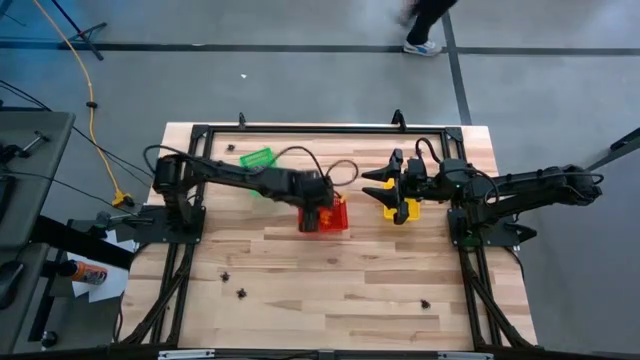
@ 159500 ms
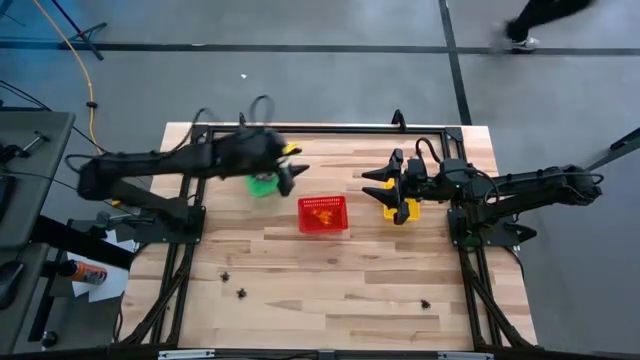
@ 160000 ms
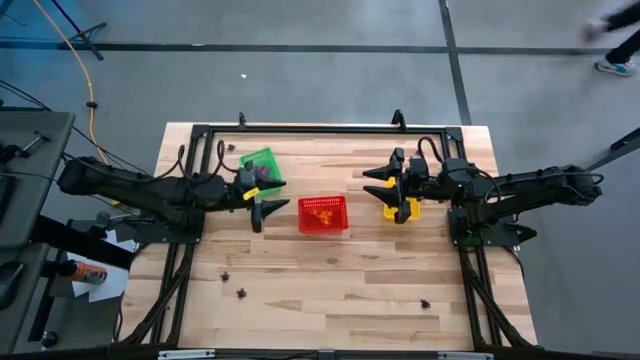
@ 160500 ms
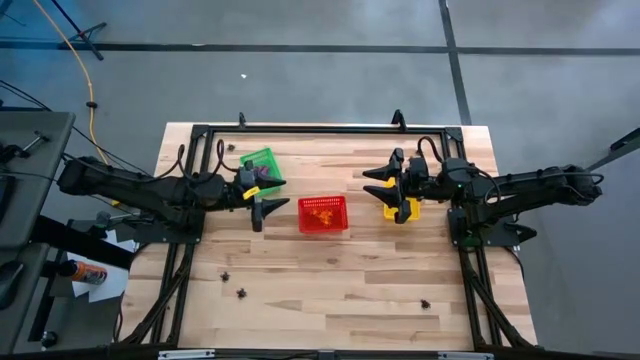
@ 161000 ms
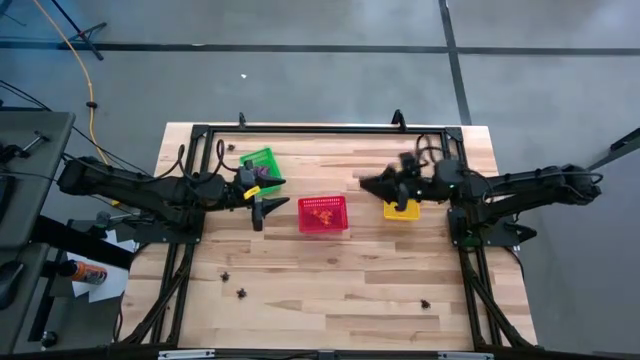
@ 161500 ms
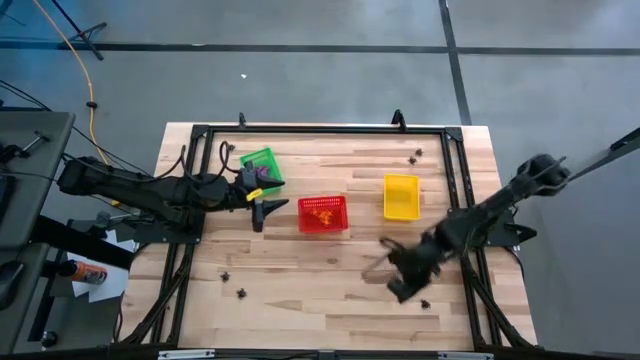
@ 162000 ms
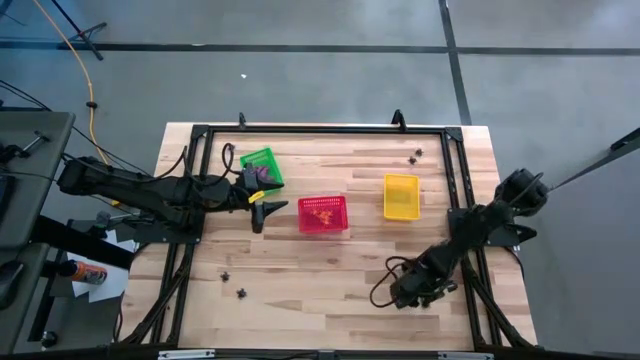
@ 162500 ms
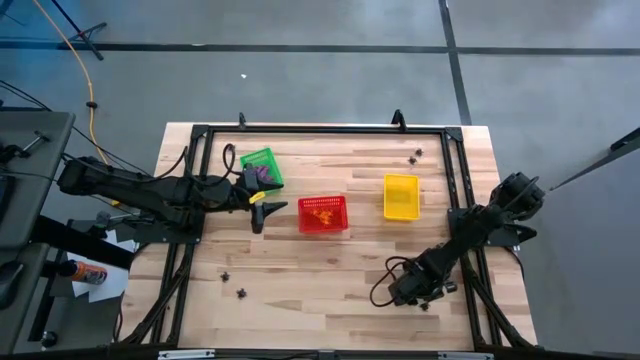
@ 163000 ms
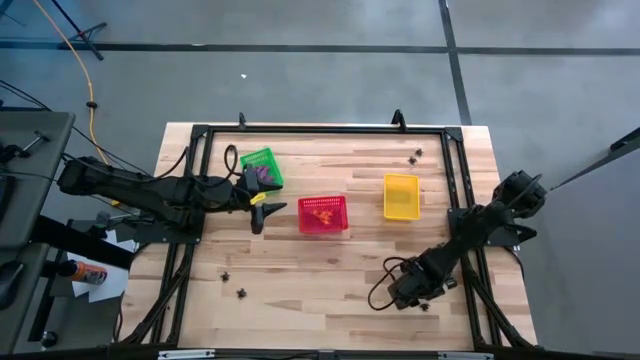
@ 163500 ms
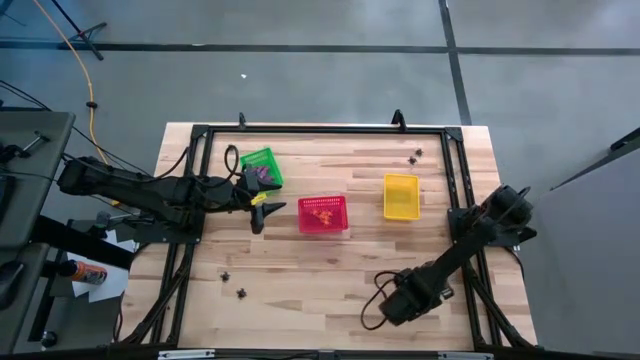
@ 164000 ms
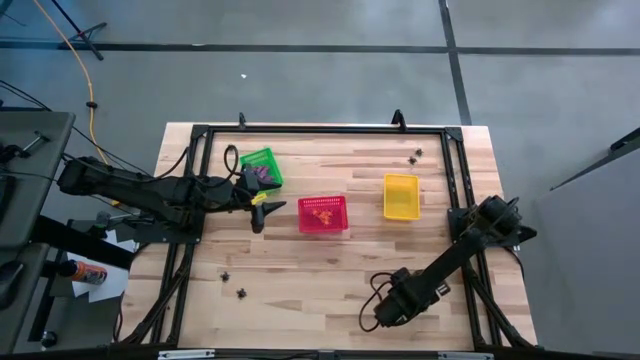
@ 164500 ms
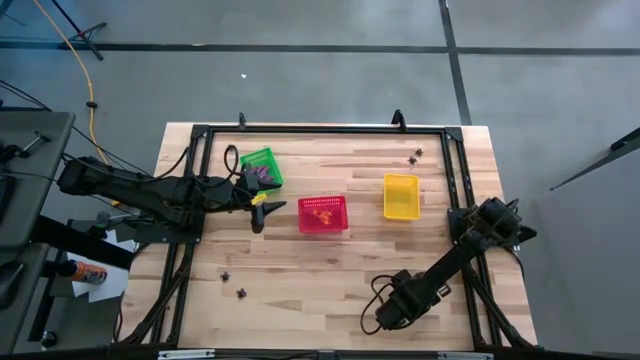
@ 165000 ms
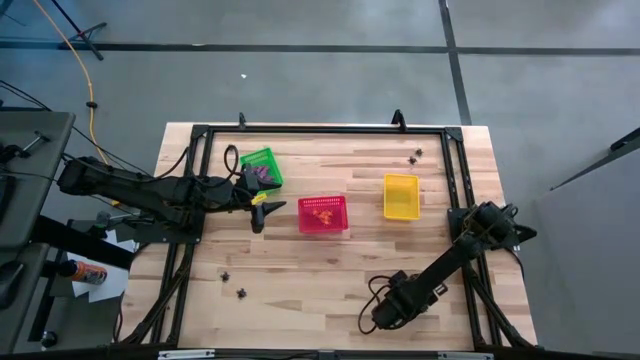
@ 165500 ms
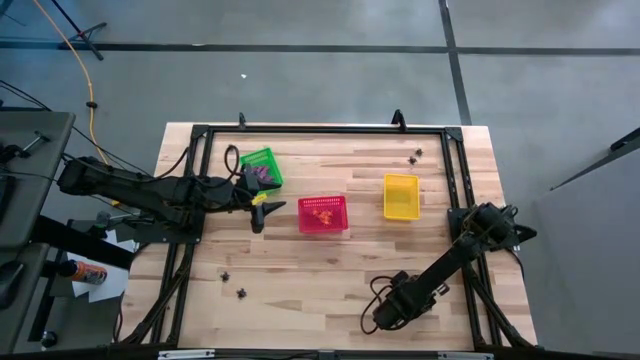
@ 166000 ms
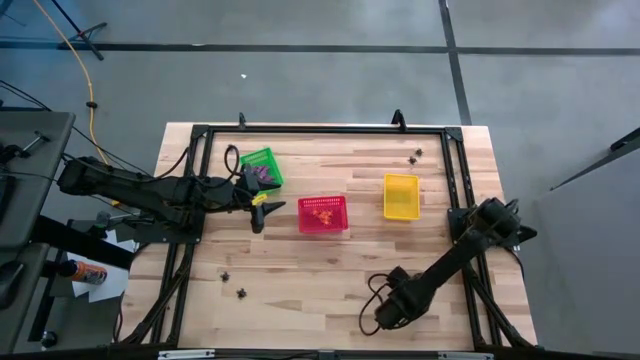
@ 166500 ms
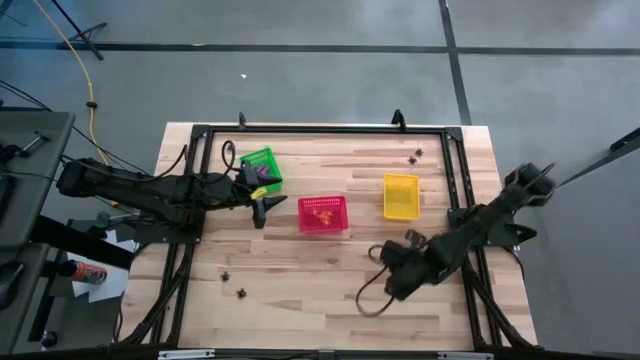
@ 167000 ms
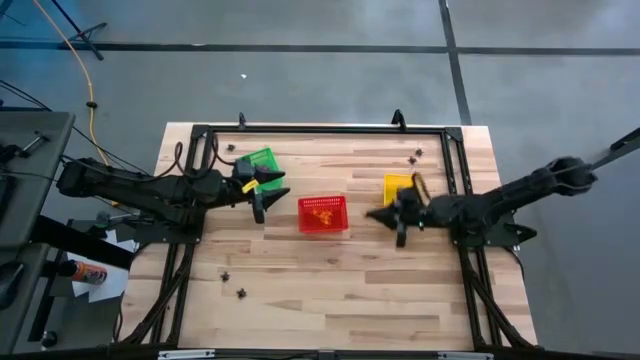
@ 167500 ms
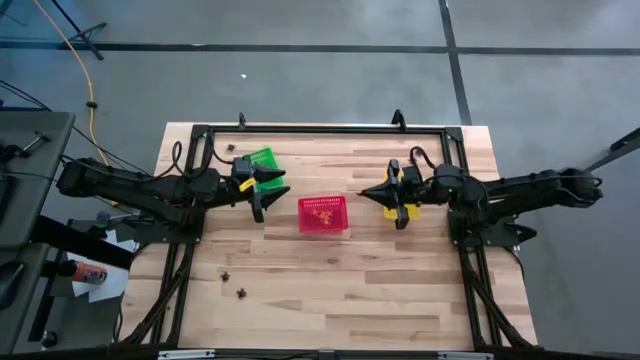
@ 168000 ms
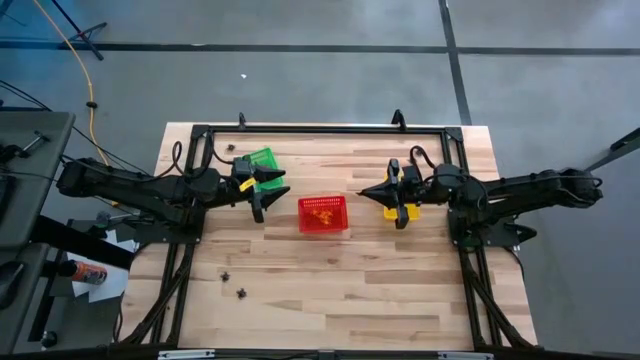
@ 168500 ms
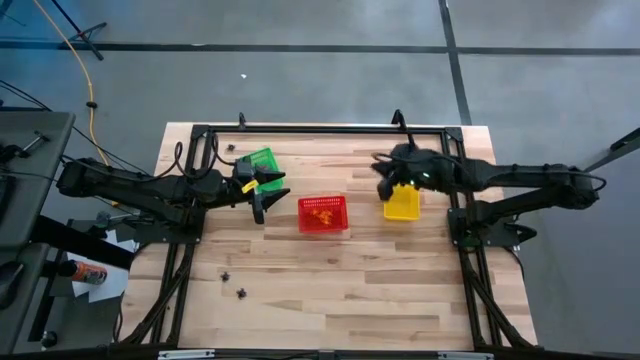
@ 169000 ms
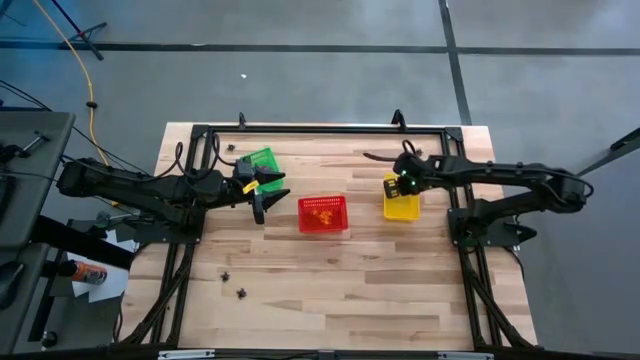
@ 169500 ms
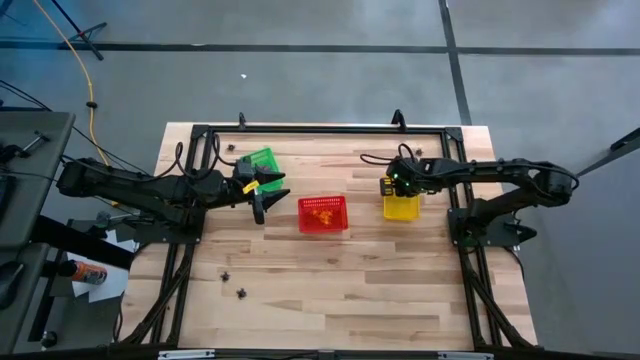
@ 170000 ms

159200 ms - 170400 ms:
Task: Sort Halloween decoration
Put the black spider toy into the yellow bin

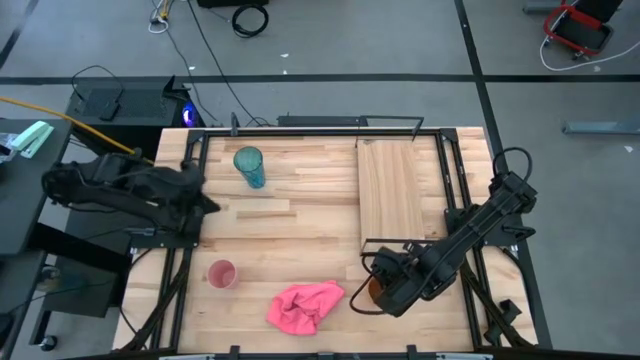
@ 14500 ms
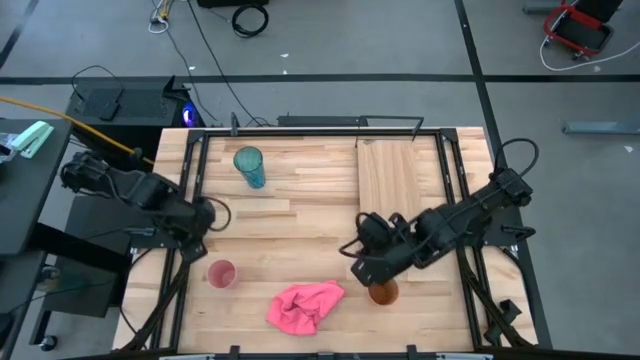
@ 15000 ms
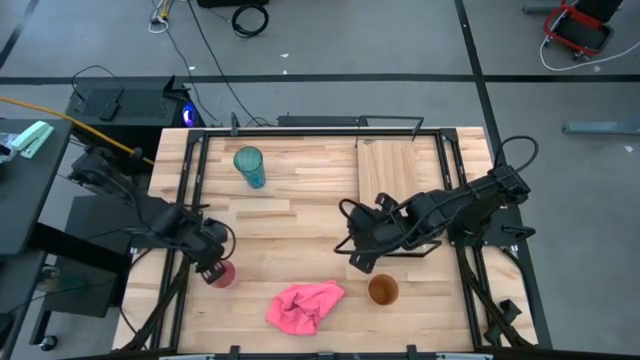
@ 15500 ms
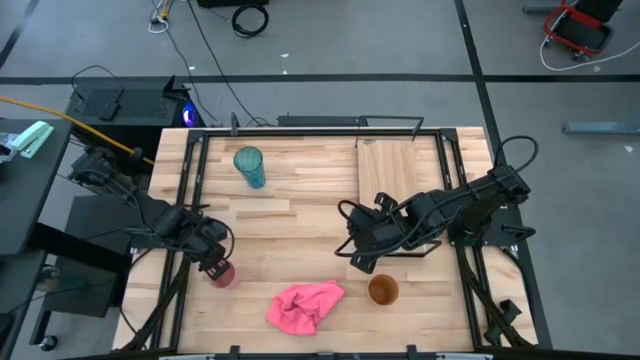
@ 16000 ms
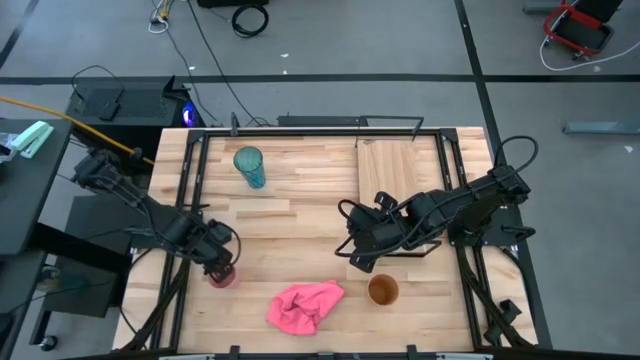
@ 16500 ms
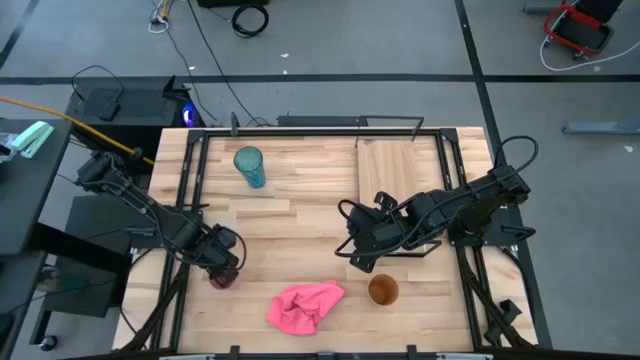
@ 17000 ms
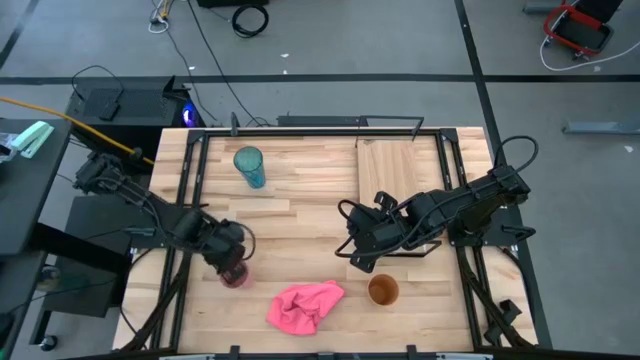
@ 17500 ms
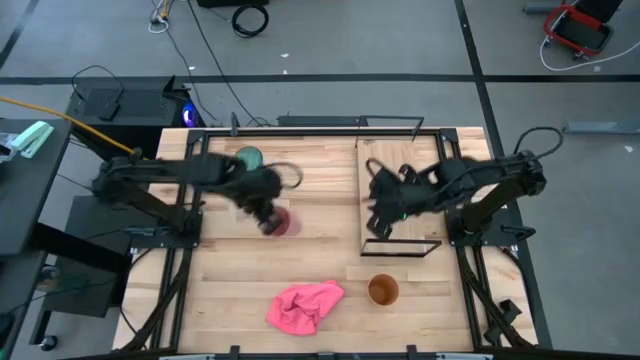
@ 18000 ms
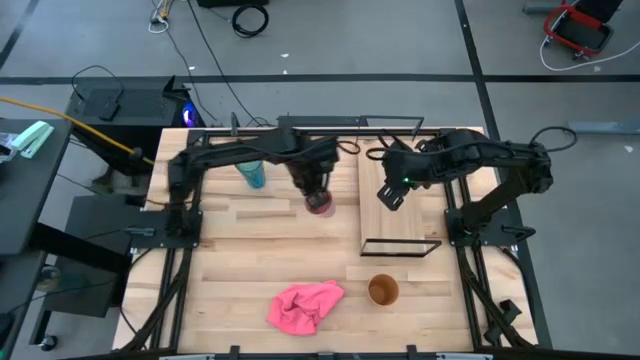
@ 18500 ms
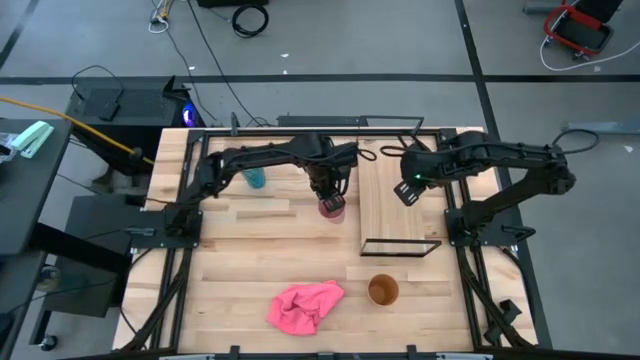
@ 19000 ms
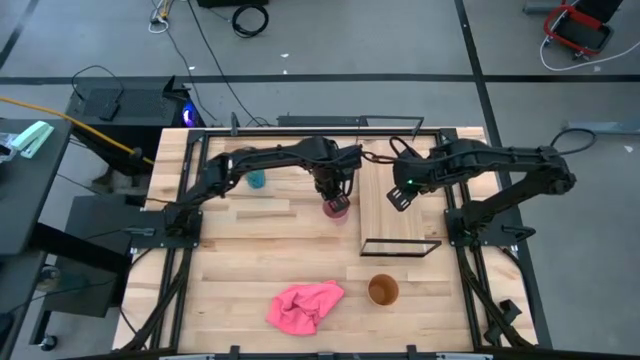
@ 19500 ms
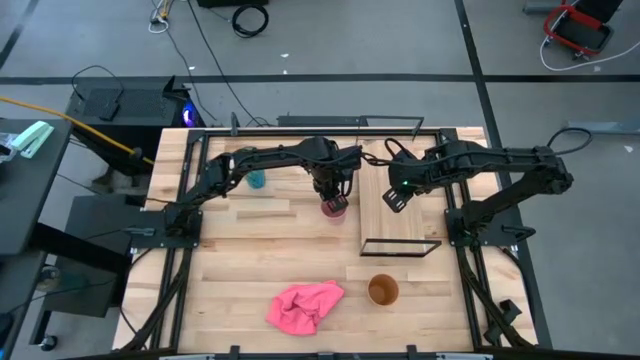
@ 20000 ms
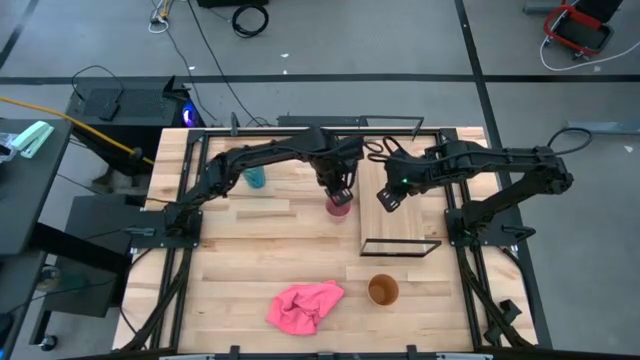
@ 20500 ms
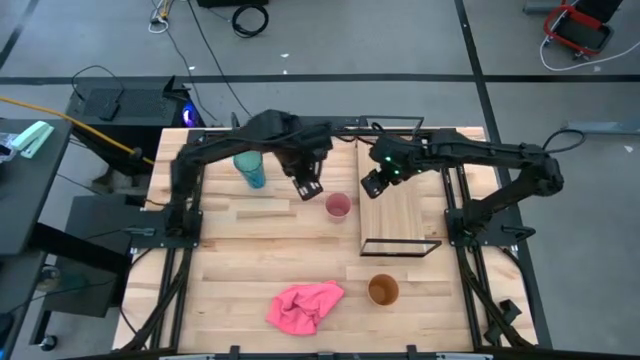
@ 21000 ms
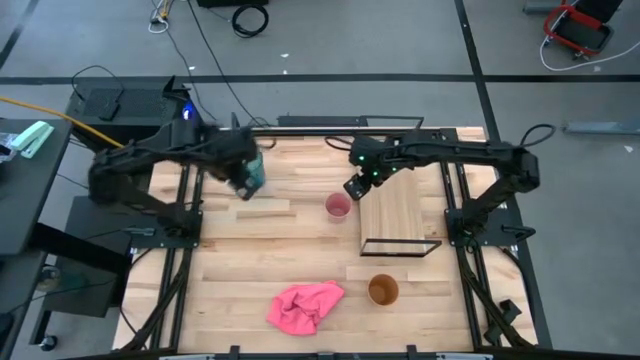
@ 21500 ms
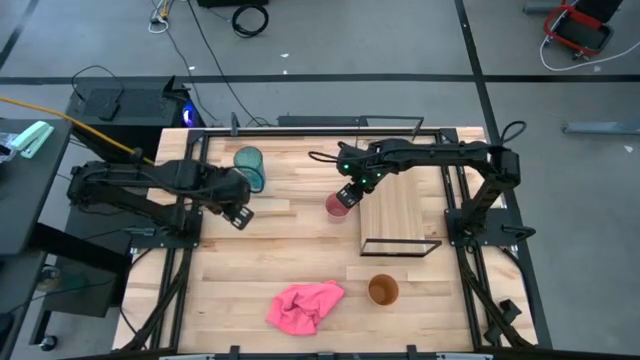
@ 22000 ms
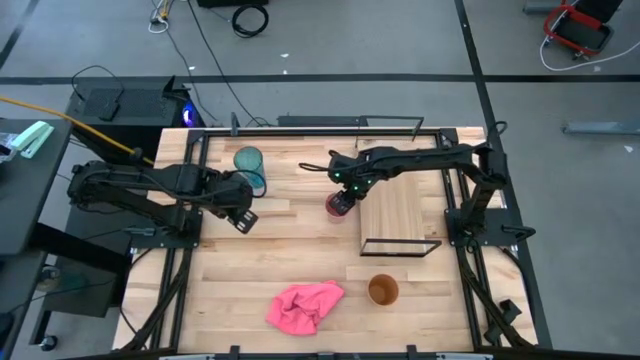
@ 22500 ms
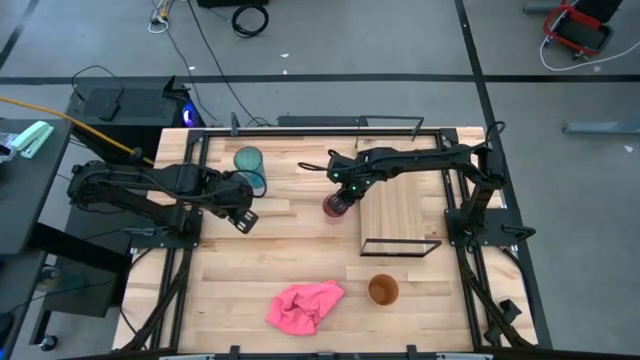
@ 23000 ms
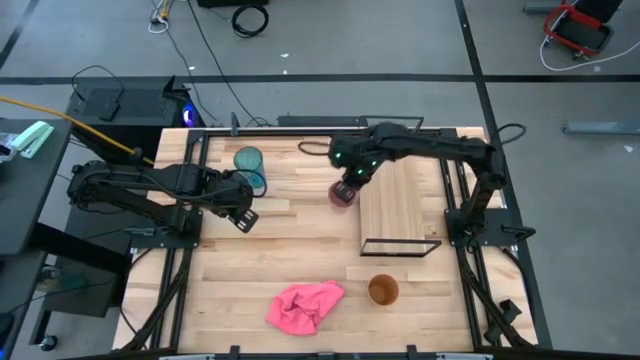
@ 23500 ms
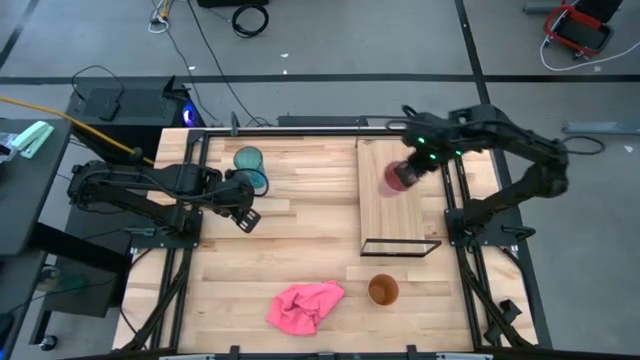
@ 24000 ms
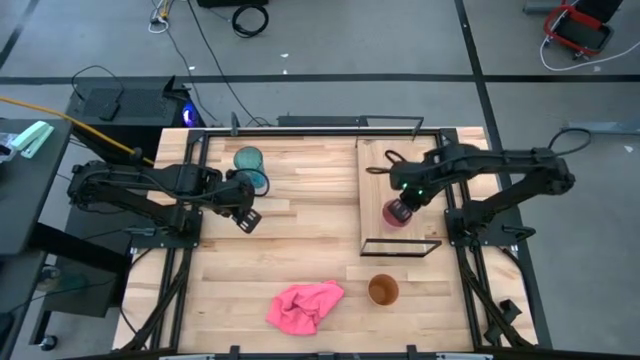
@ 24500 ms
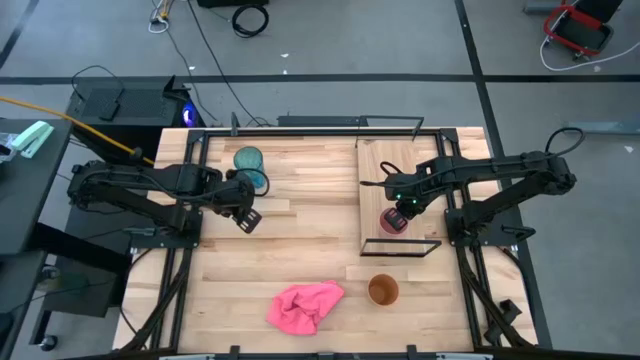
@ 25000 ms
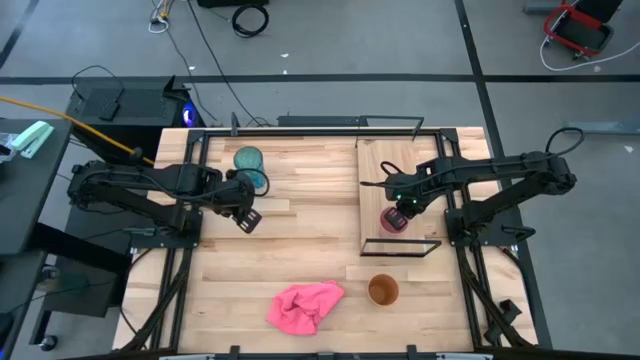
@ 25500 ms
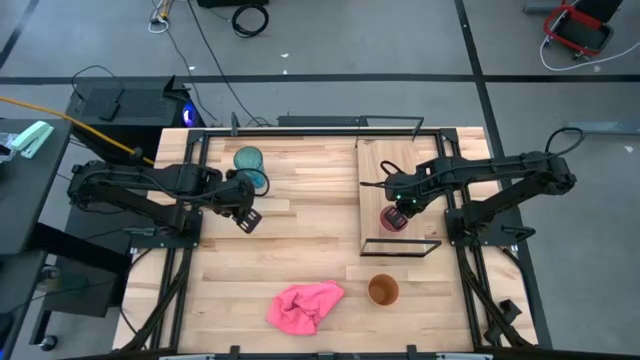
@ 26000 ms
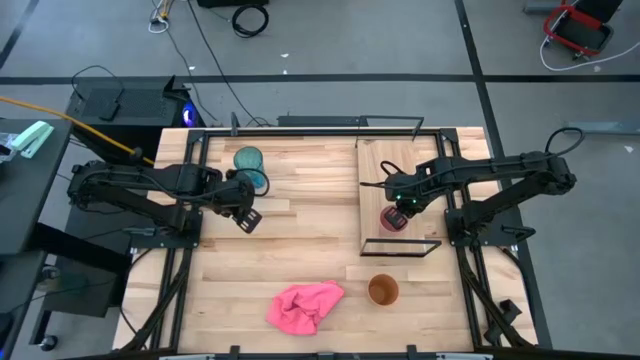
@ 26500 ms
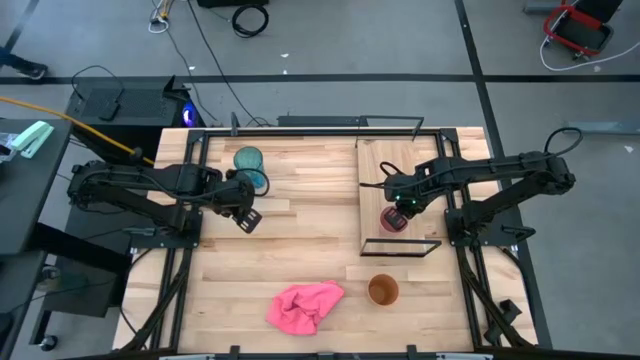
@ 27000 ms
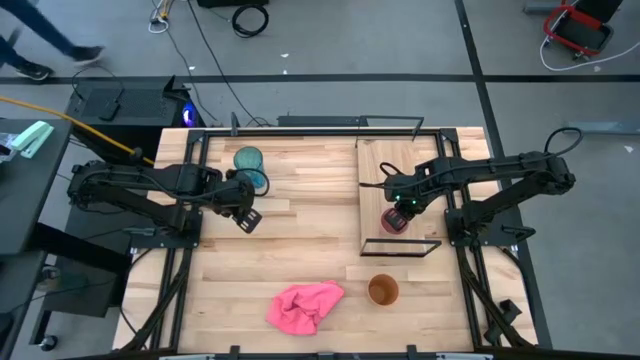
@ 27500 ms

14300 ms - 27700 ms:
Task: Stack small to large cups/mugs on shelf
Put the pink cup on the shelf
